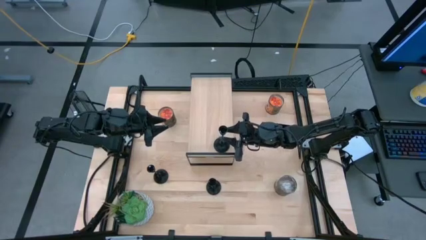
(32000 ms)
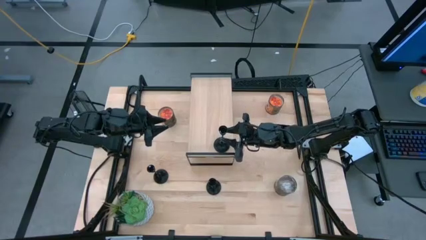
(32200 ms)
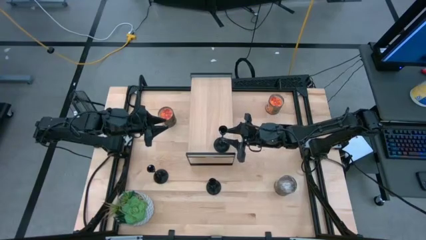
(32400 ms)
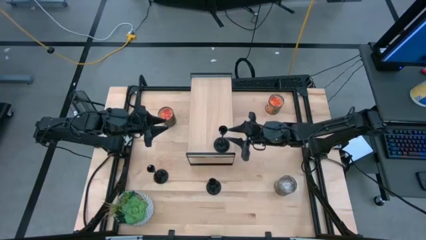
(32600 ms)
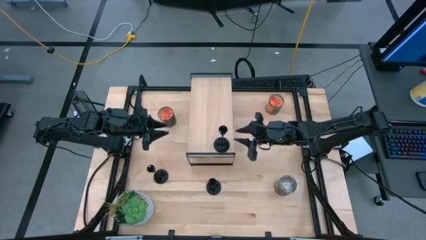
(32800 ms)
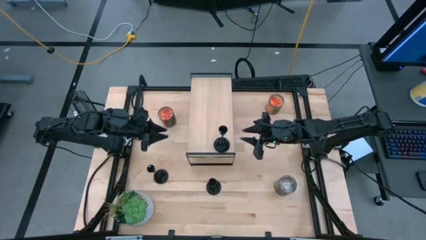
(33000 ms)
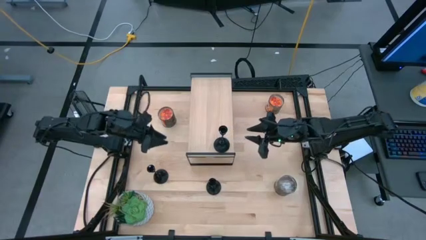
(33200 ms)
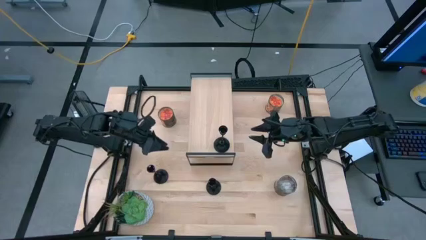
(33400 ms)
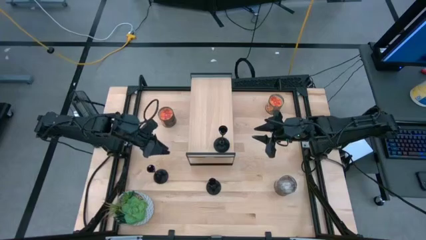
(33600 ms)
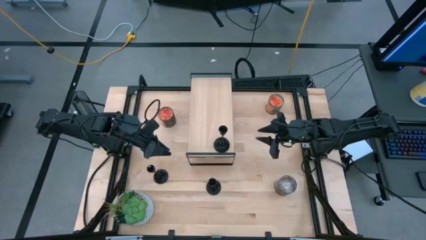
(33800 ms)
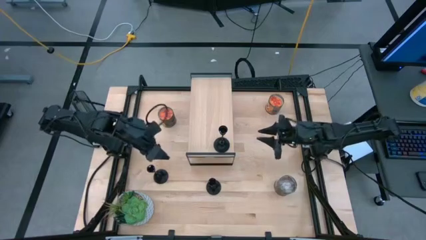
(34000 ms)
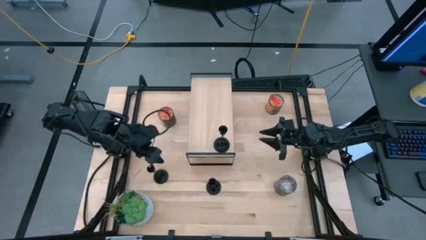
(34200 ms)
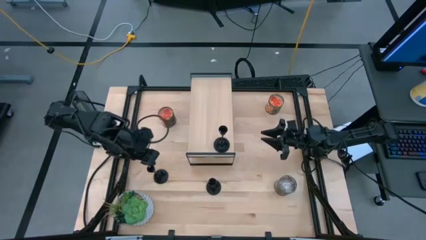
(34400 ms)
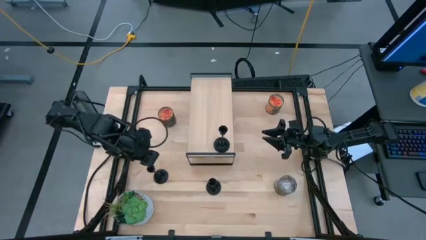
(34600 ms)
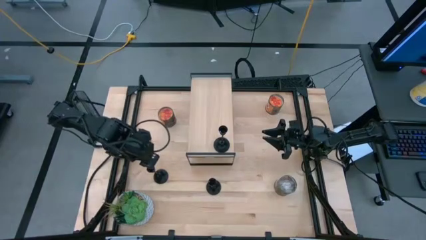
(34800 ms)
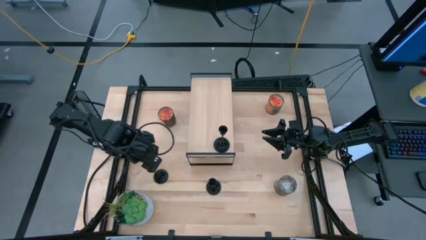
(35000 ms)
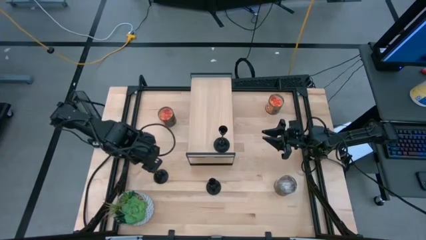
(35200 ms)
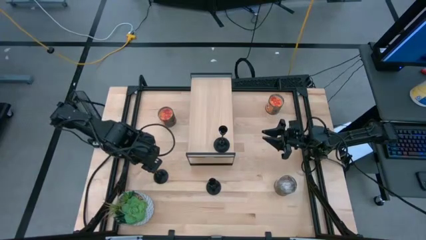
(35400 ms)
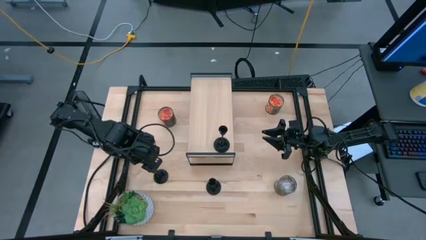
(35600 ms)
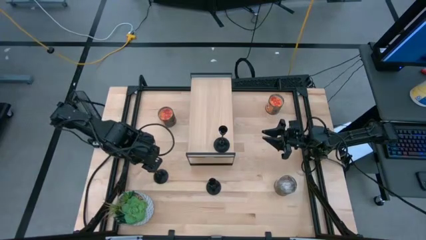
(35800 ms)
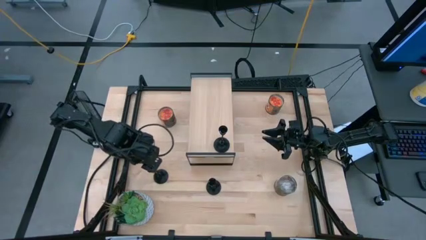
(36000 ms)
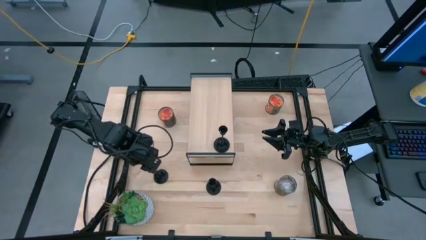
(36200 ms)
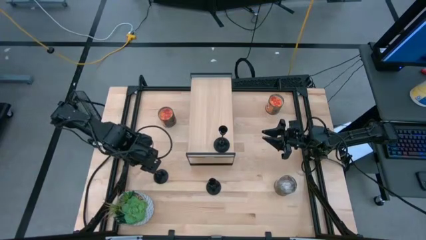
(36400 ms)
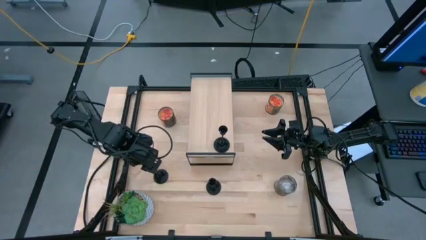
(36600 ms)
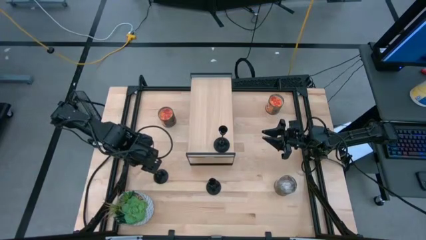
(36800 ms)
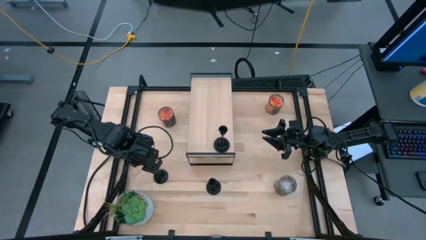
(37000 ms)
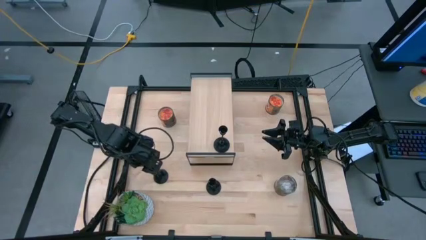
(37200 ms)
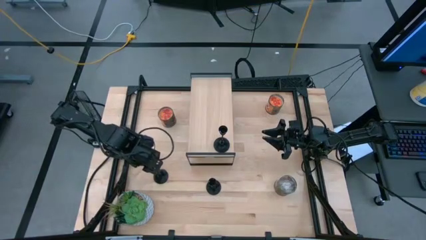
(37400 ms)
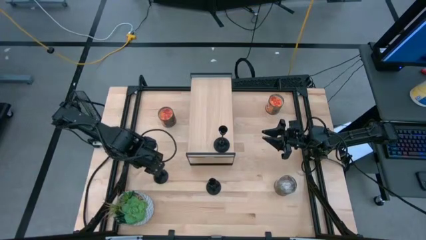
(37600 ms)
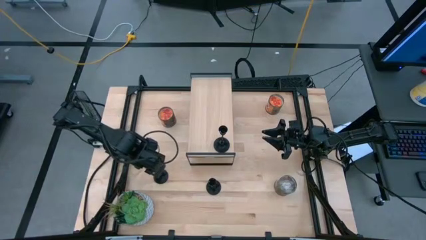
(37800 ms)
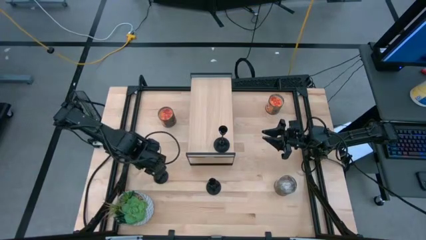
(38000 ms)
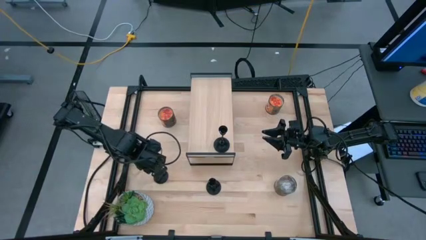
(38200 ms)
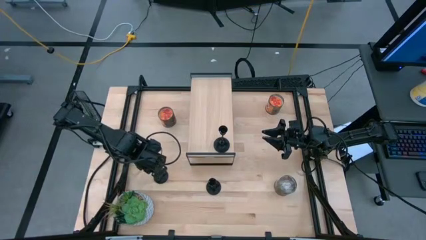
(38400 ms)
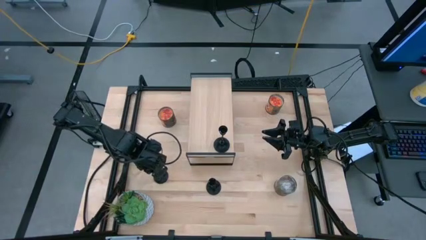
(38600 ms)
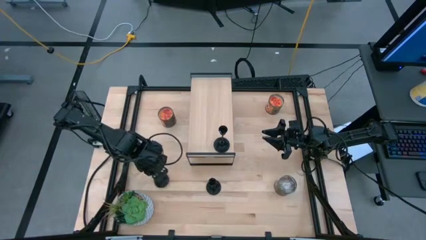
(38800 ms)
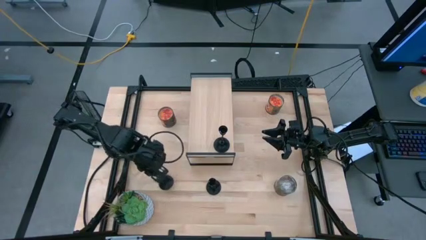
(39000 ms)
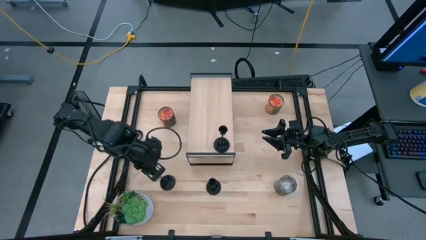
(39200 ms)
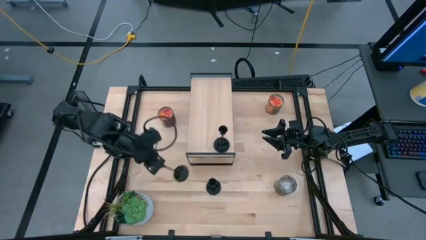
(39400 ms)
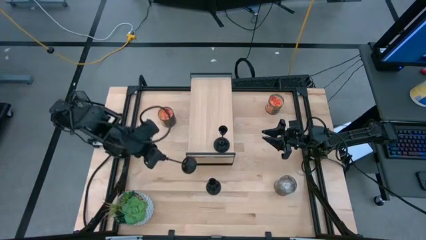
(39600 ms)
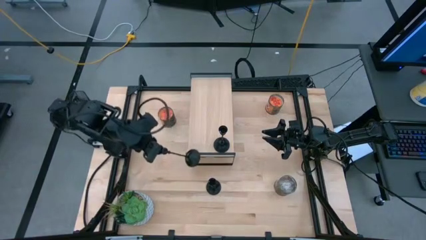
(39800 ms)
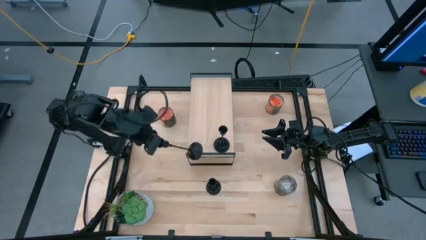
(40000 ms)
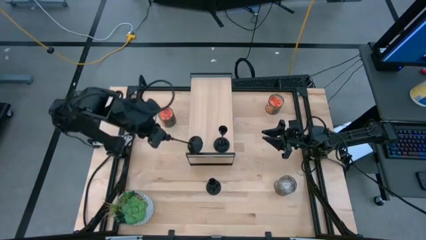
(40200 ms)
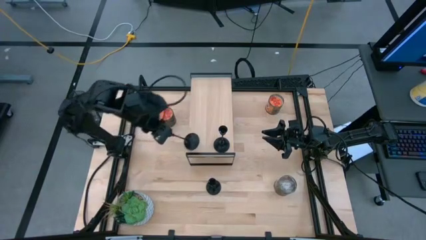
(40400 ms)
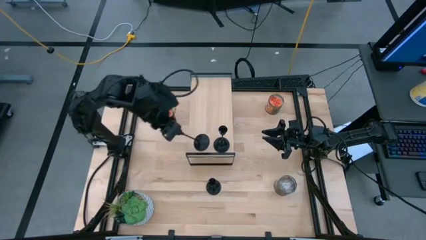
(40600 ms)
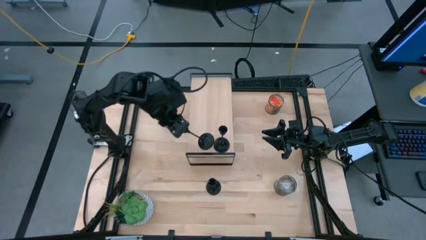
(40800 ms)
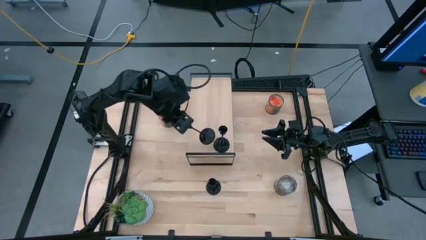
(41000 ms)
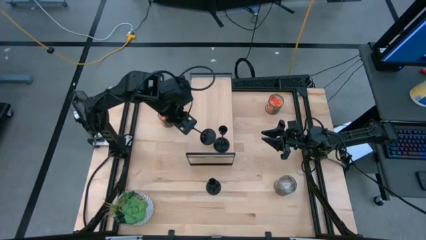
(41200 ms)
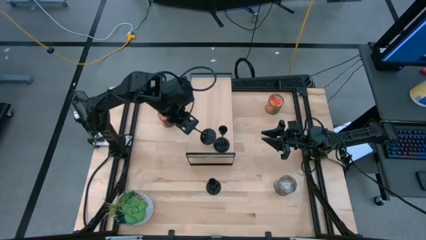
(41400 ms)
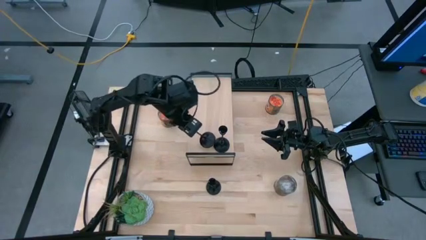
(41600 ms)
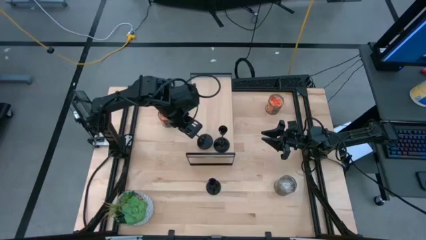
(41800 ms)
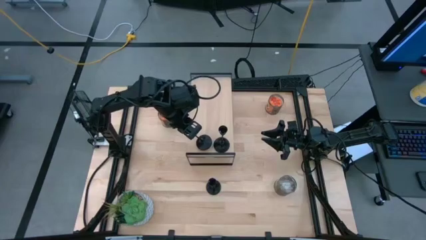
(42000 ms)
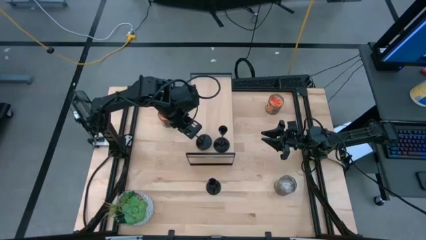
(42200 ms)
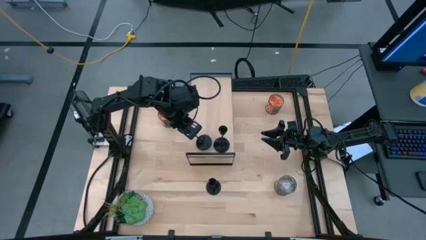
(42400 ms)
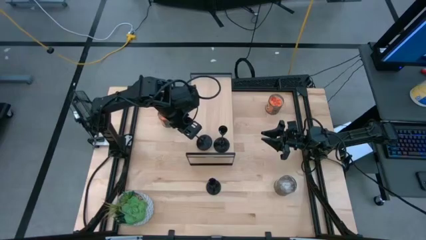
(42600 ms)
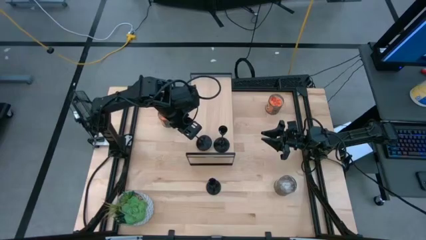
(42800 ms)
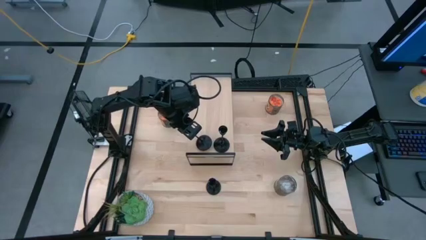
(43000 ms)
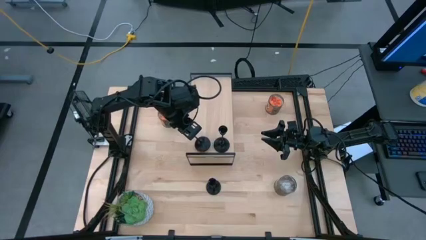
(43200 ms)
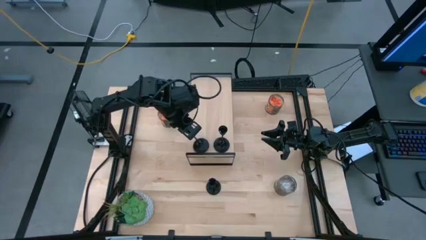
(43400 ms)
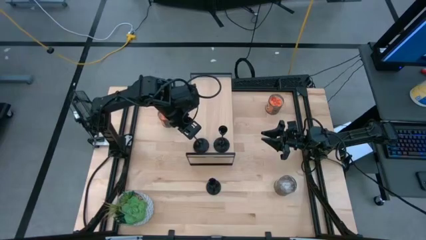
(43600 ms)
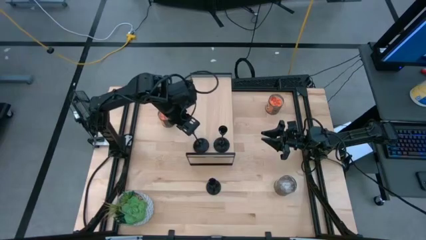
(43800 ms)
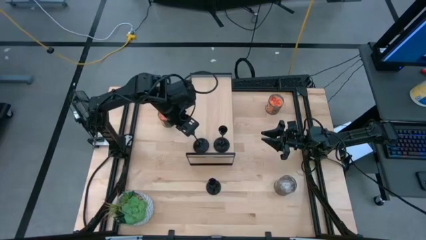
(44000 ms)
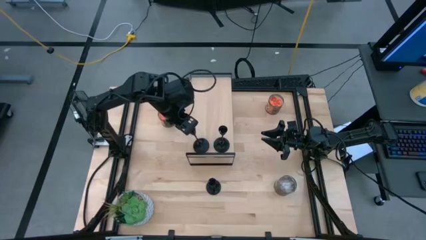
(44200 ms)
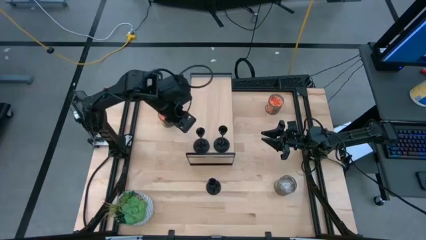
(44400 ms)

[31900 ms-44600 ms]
Task: Pick & Place candle stick holders
Put the left black candle holder on the shelf

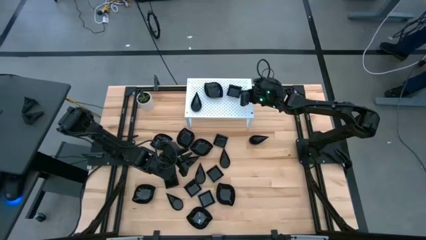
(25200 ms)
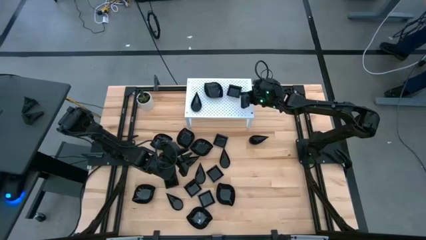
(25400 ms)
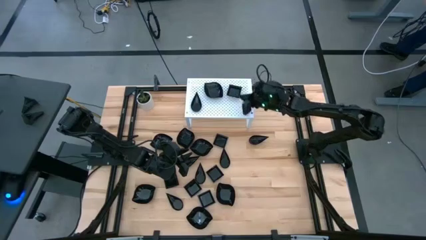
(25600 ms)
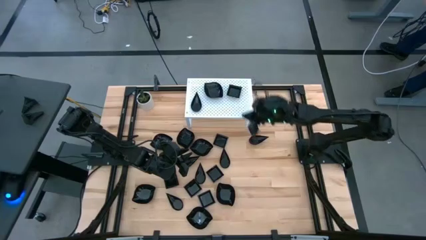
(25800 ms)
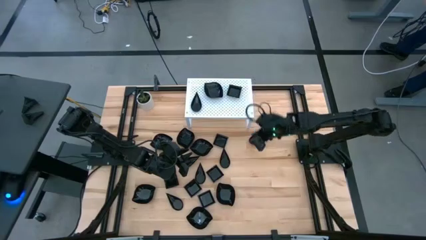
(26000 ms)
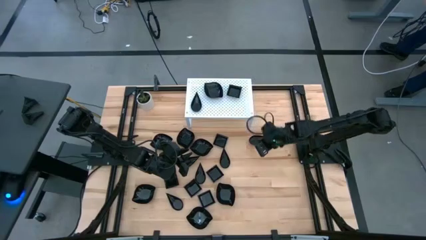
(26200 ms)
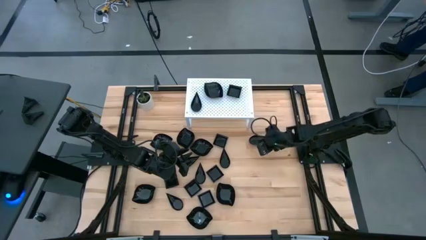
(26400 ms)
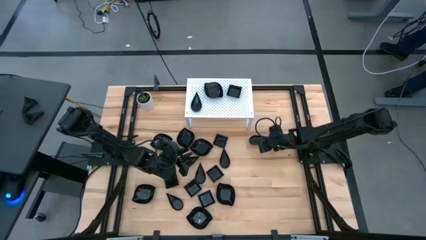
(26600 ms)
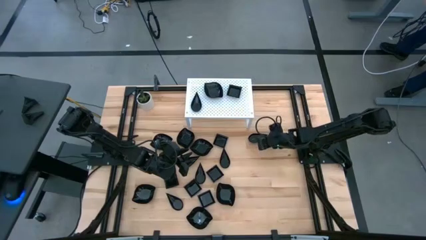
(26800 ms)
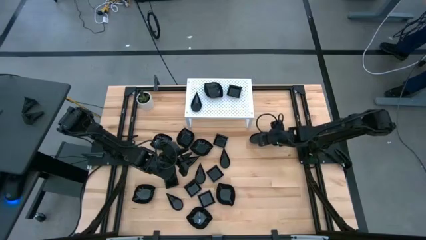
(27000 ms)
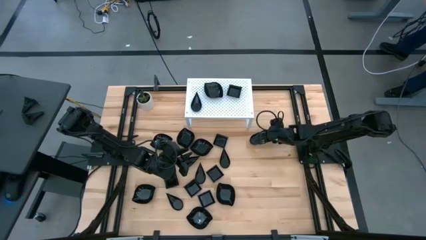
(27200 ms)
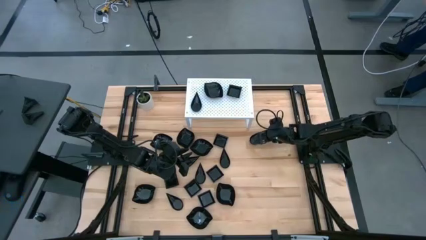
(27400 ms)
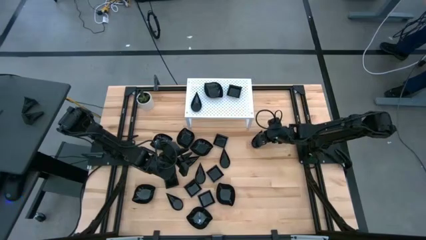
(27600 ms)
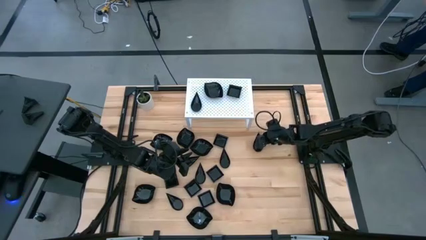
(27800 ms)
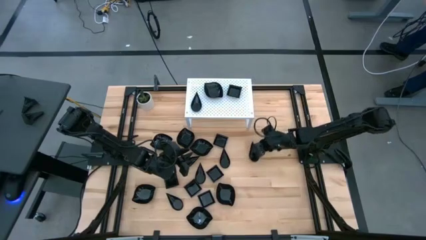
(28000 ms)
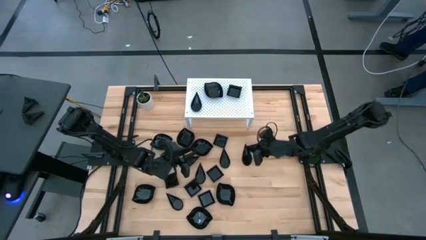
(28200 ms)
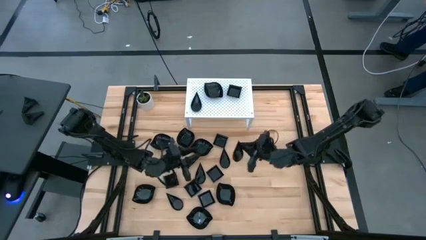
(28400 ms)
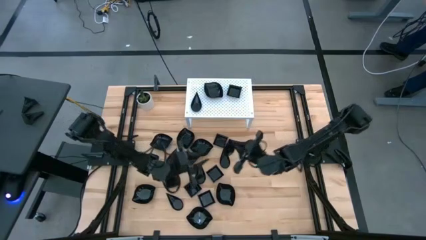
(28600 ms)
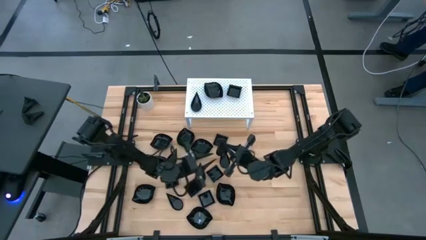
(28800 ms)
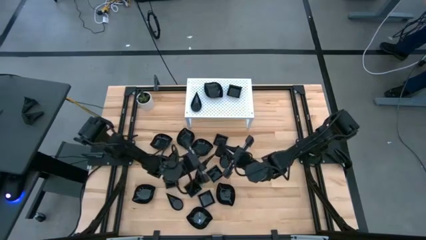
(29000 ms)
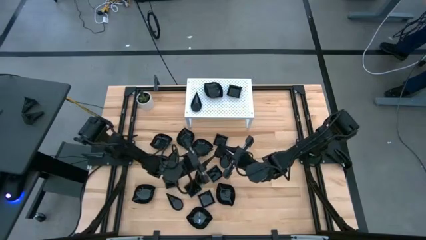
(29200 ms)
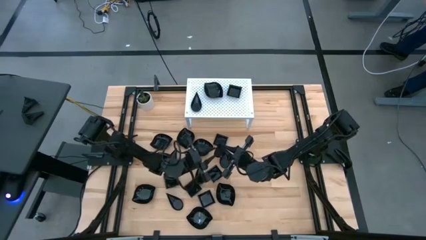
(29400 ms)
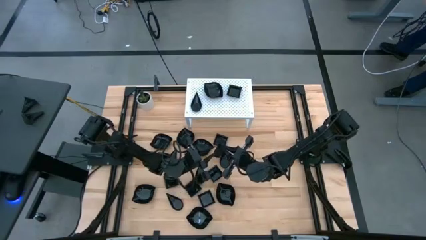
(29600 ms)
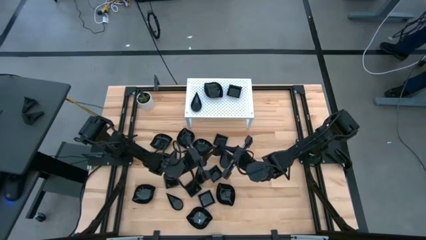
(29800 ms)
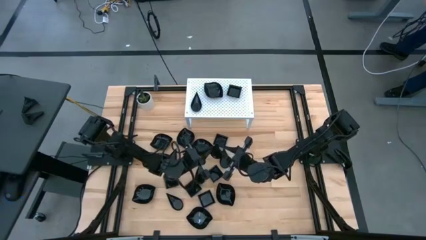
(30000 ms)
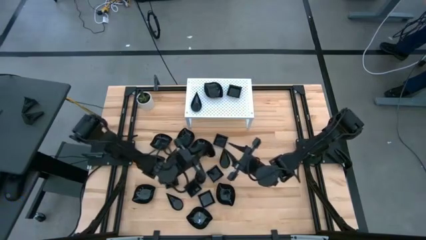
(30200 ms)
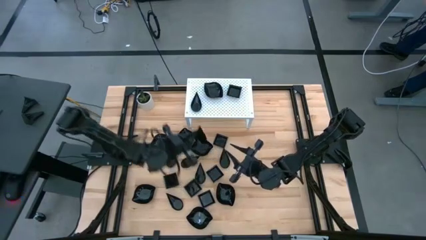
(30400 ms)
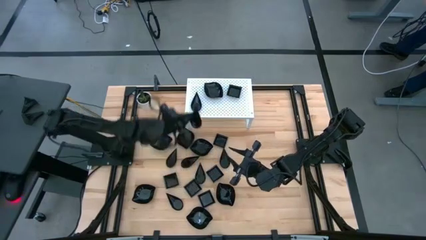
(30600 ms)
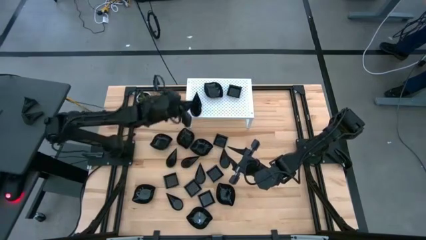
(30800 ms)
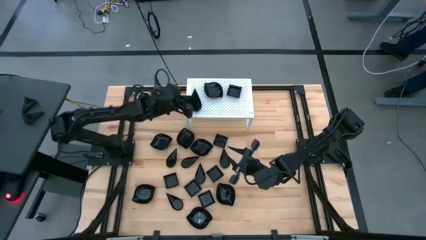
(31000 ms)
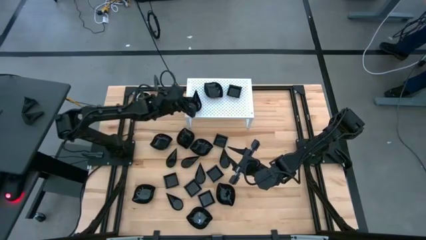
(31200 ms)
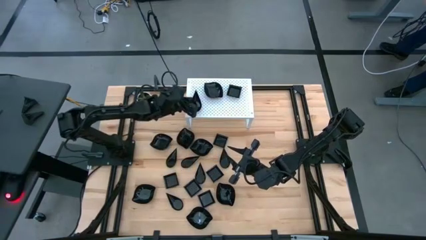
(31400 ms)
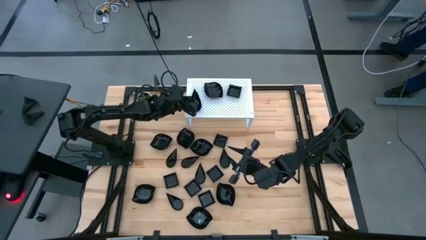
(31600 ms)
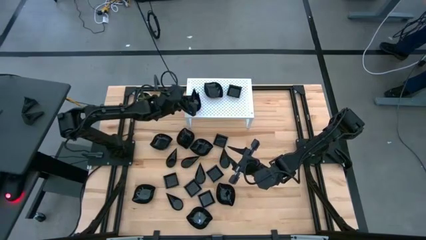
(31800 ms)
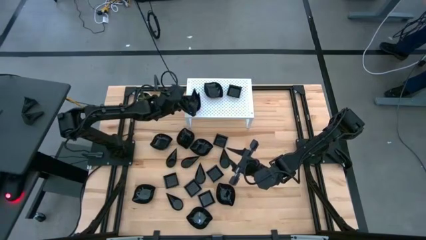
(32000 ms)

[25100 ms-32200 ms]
Task: Pick & Place Mini shaped plates
Stack the black drop-shaped plate on top of the other black drop-shaped plate on the shelf
